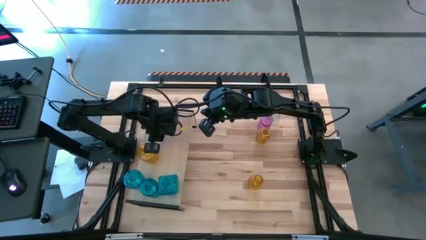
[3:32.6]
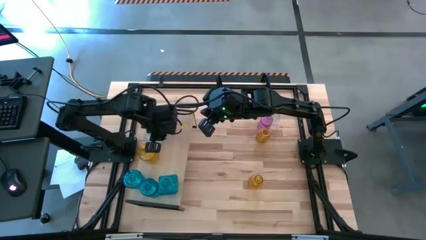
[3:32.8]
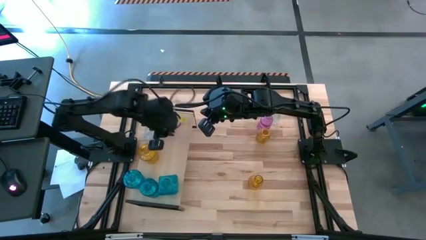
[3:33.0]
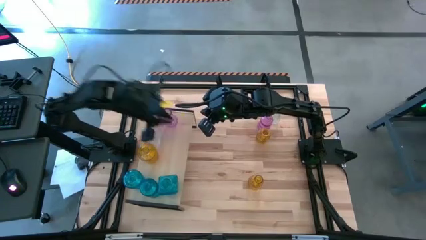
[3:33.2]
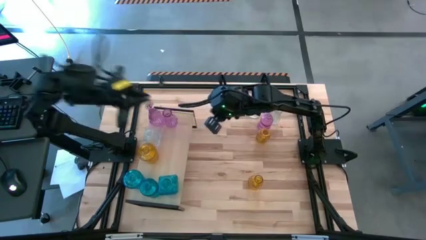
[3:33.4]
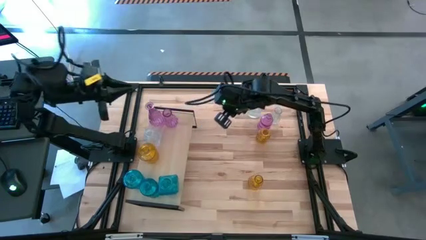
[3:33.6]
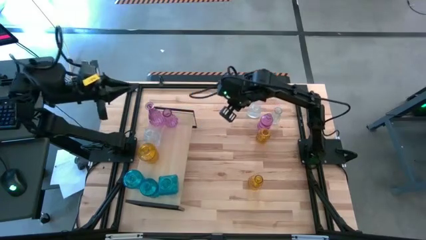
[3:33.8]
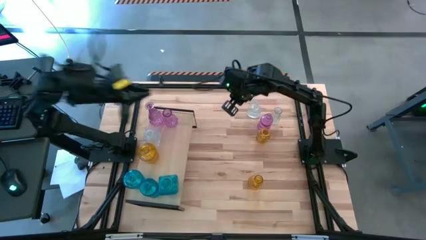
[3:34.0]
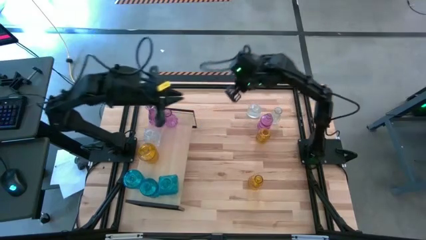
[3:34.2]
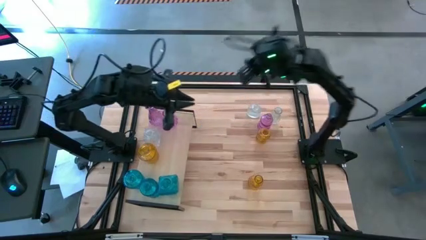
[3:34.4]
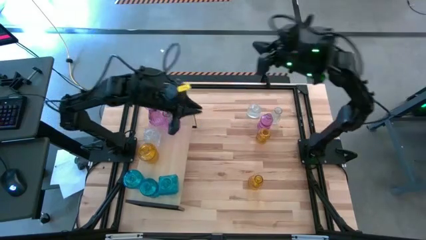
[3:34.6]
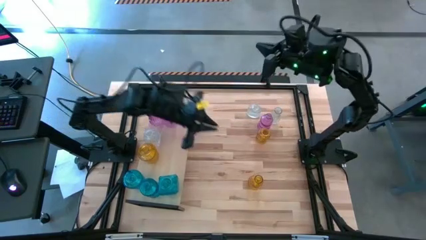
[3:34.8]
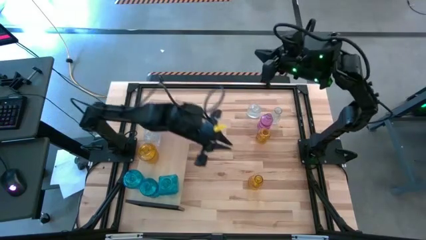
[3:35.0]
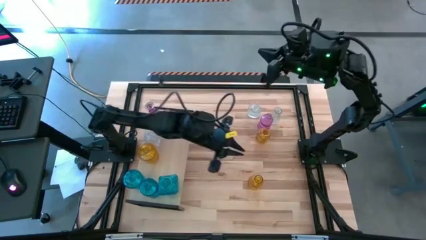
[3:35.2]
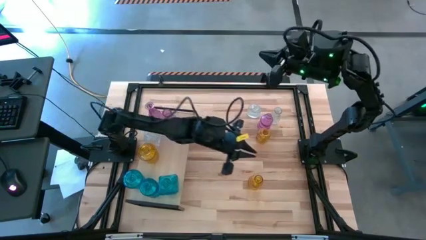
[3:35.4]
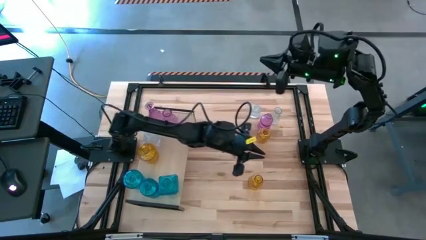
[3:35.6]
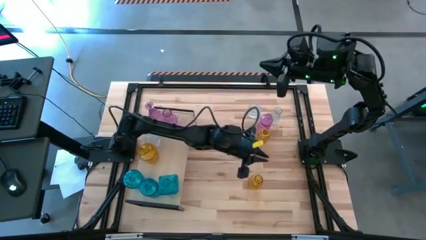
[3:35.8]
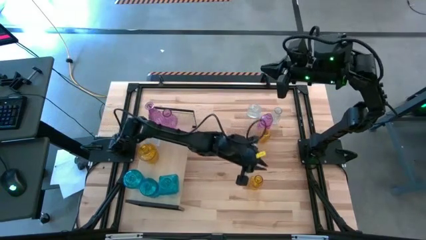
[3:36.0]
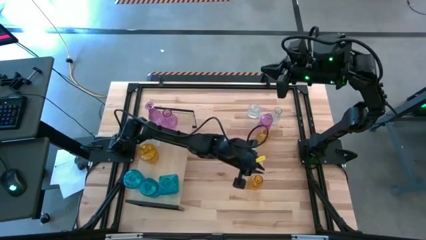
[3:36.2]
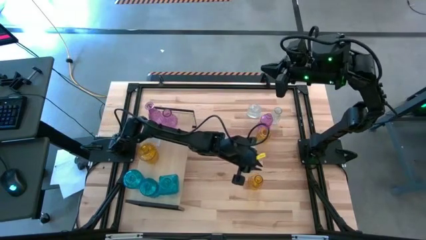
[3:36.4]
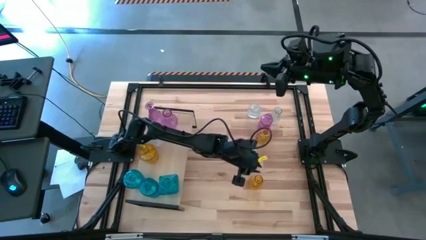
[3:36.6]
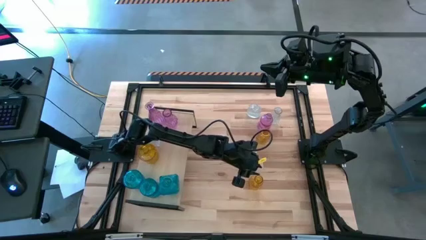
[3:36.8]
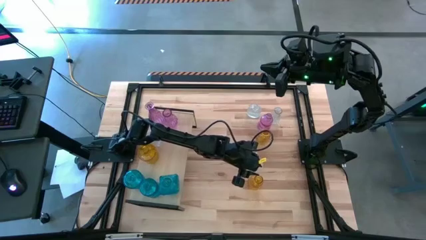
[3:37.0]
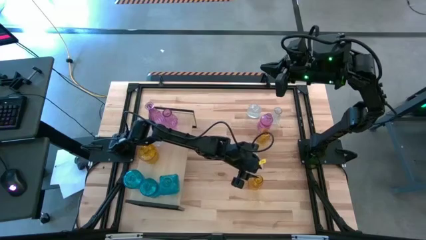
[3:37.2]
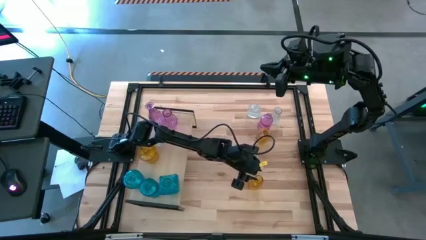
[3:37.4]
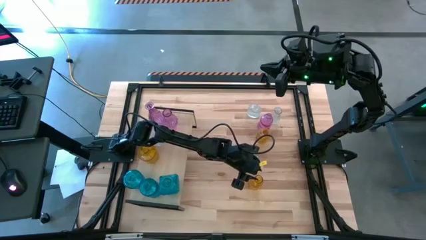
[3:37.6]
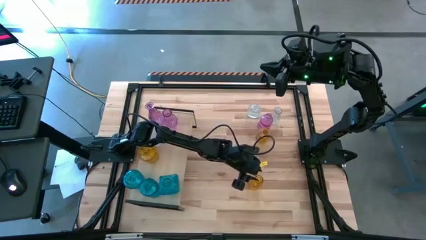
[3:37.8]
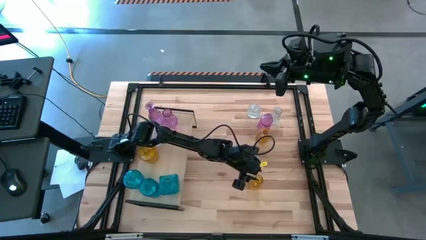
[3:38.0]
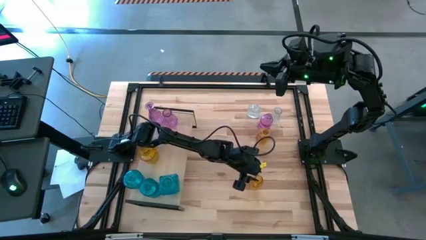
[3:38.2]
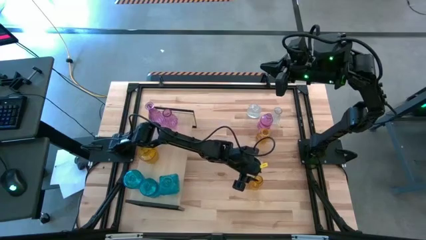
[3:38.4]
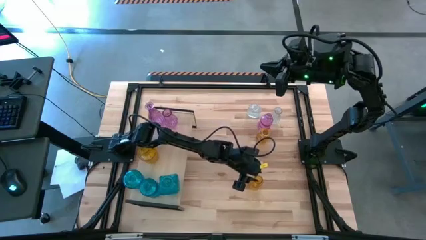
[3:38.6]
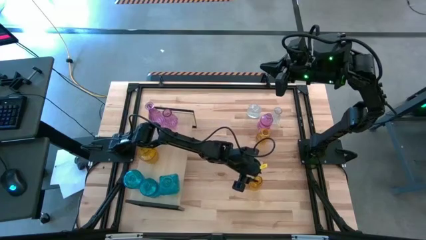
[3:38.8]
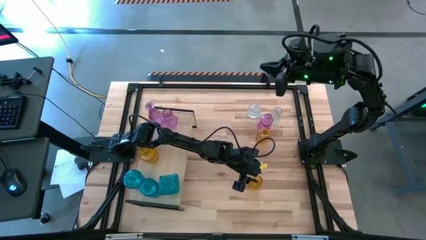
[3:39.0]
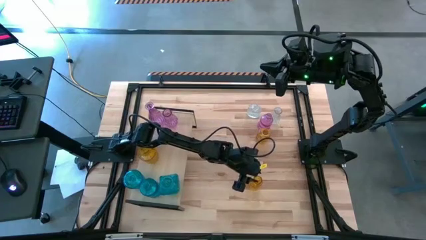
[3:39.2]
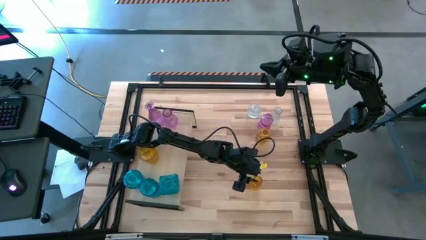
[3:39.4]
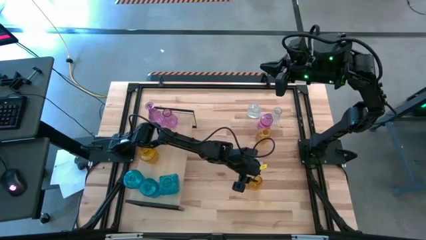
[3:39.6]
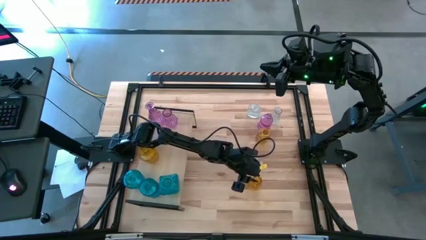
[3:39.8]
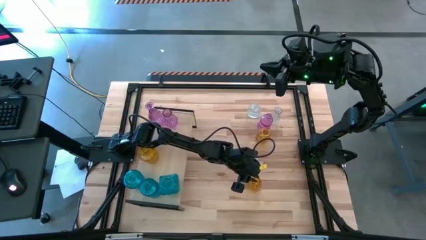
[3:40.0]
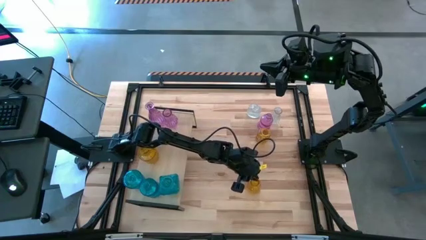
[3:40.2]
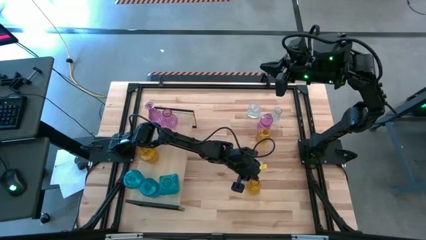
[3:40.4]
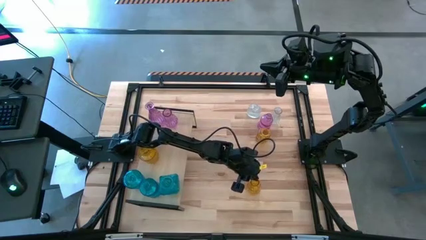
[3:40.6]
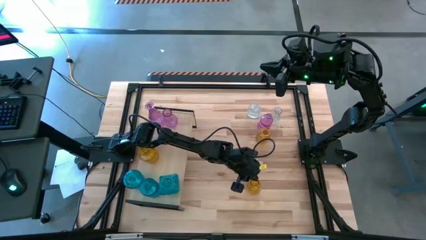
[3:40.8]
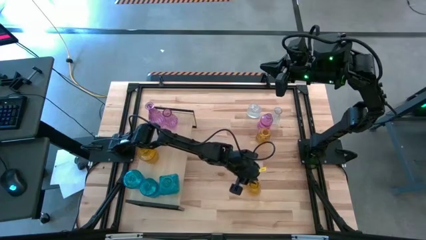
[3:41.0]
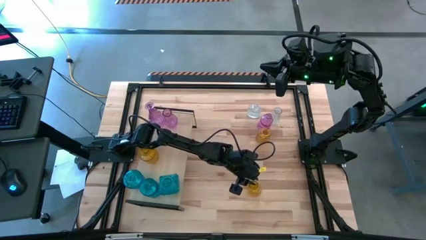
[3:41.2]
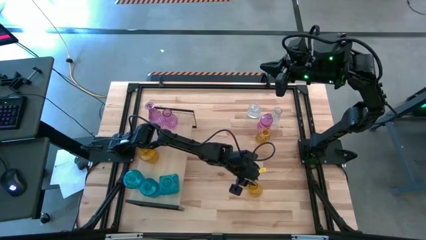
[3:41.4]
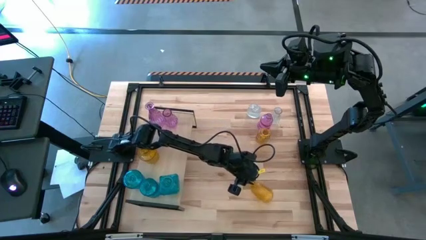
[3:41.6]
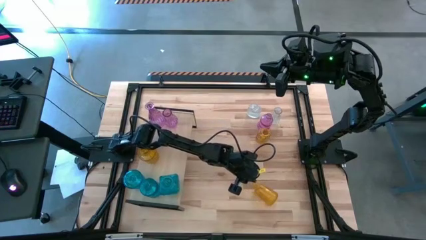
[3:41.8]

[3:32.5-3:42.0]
Task: sort vases onto shelf
Put the bottom yellow flower vase on the shelf

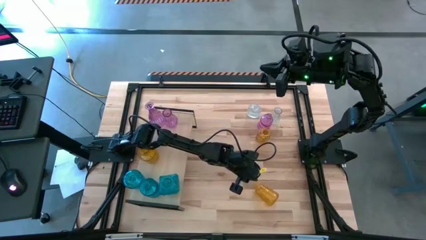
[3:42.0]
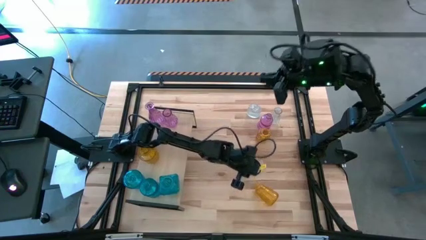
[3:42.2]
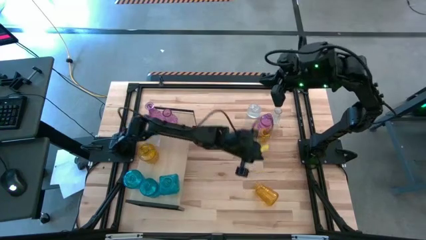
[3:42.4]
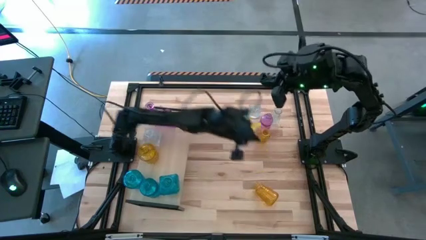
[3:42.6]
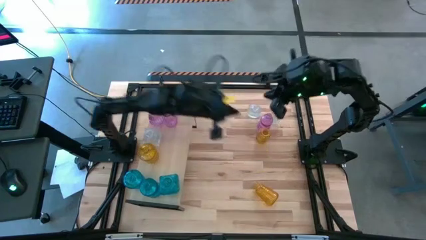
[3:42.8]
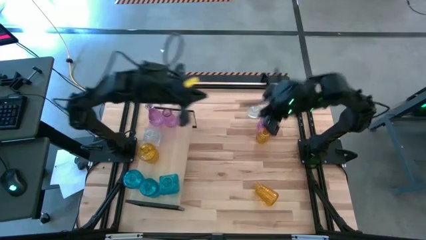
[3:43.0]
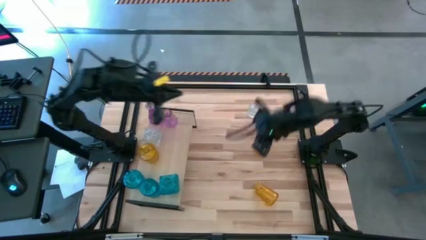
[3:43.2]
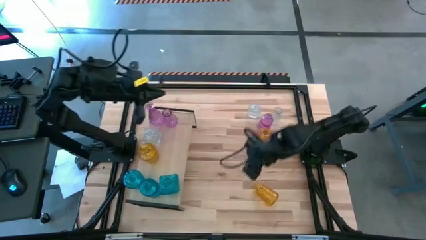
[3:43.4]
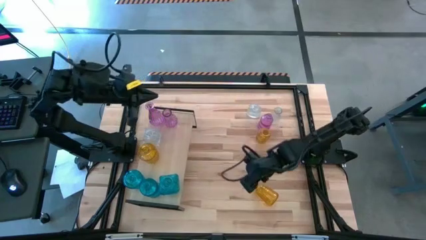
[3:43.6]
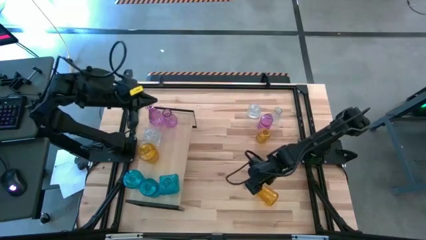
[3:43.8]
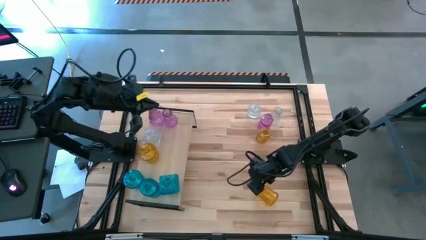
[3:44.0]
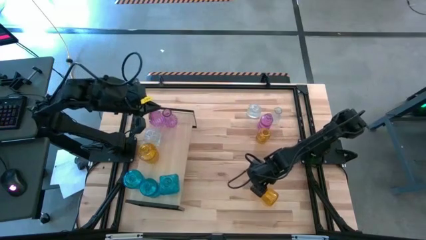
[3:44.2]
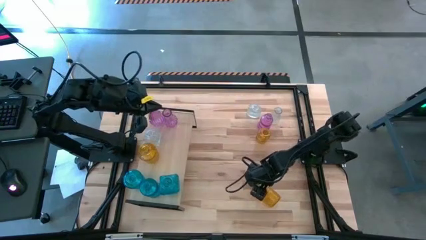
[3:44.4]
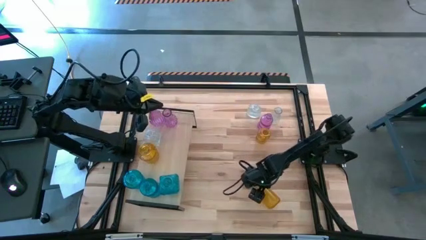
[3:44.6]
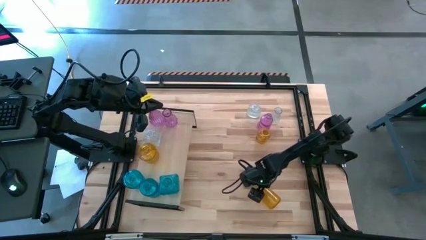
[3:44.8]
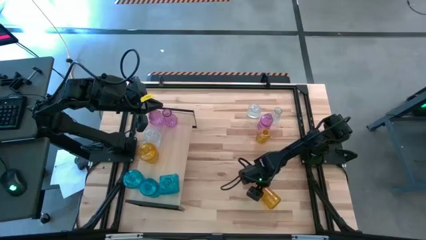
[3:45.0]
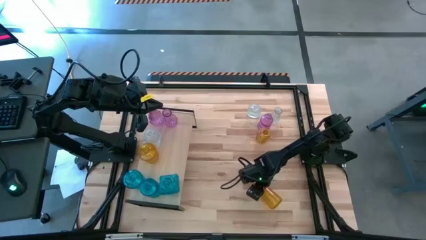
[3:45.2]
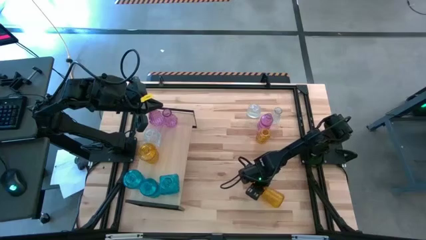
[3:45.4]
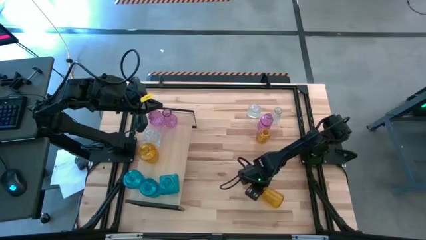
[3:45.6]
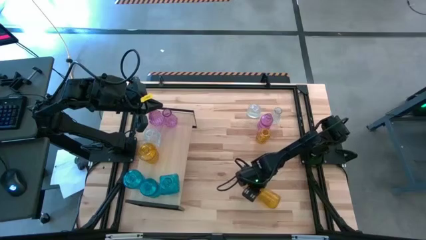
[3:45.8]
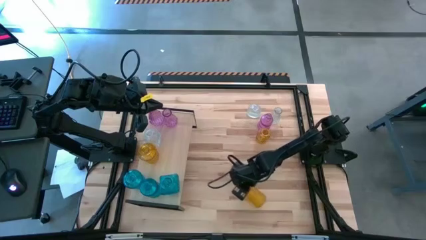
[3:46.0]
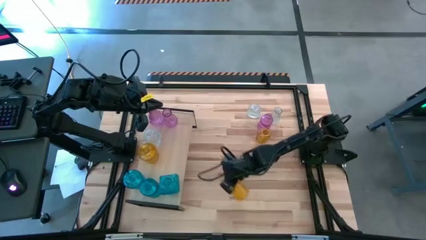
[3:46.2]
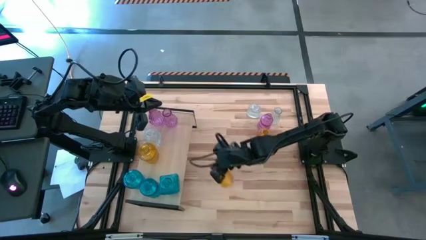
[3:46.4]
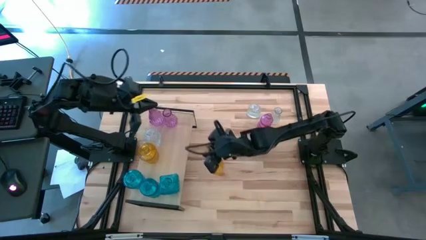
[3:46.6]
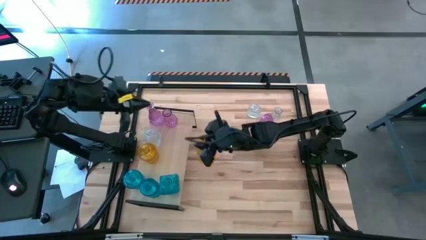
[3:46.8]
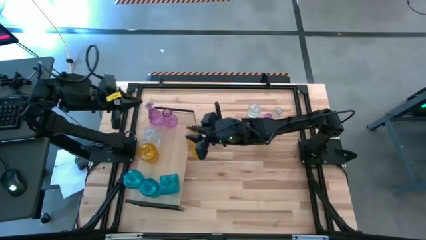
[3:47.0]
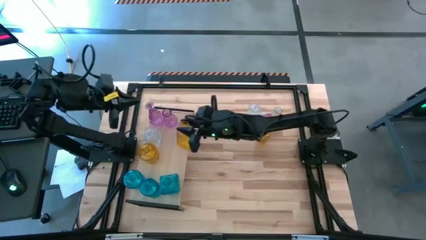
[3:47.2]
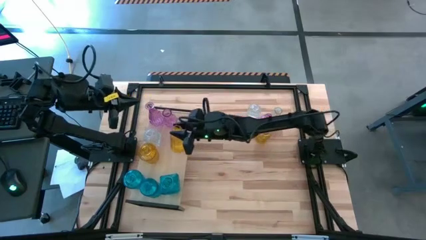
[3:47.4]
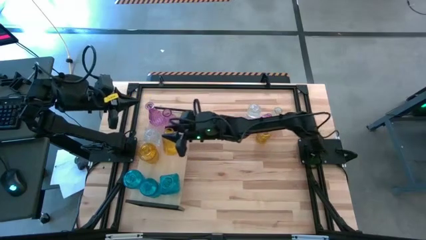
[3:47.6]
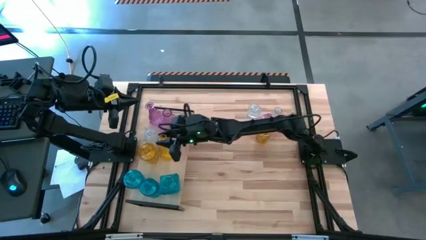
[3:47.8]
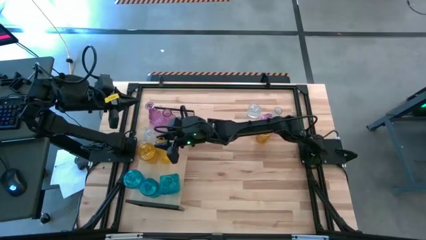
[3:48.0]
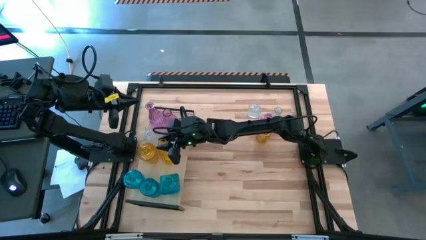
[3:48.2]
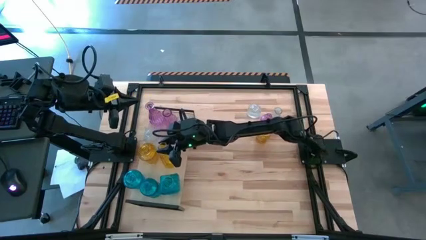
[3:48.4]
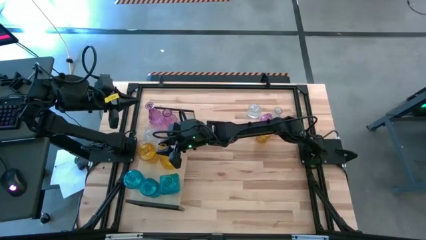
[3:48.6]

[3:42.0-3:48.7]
Put the bottom yellow flower vase on the shelf
